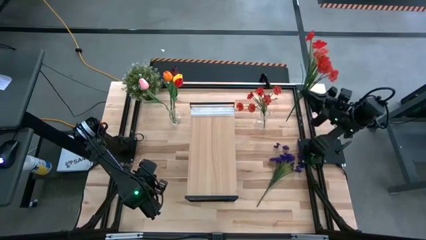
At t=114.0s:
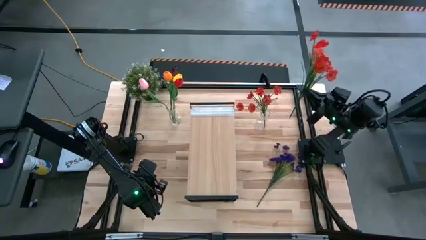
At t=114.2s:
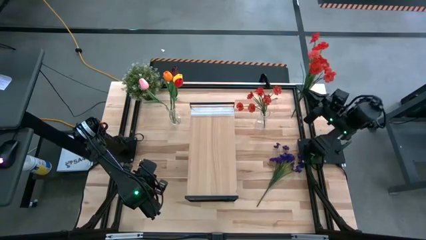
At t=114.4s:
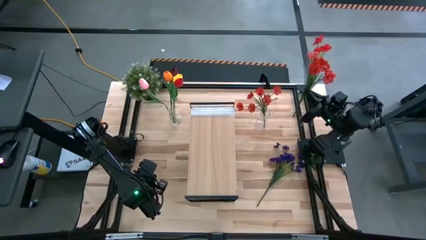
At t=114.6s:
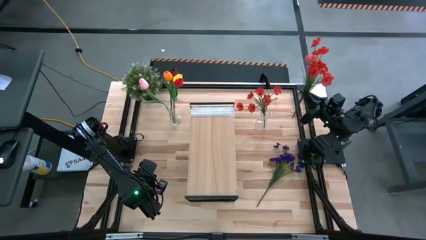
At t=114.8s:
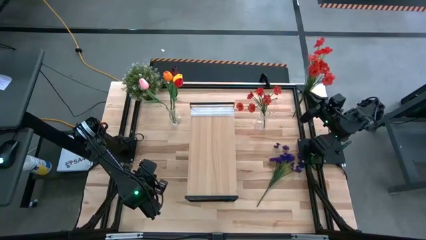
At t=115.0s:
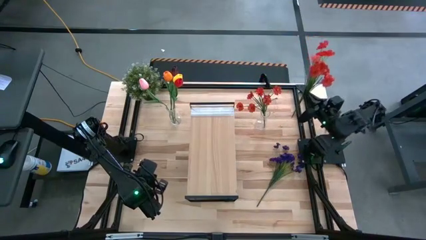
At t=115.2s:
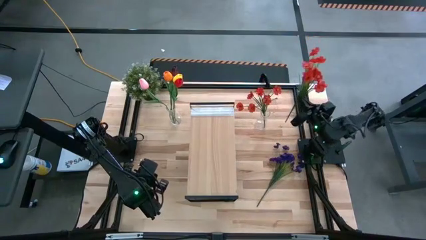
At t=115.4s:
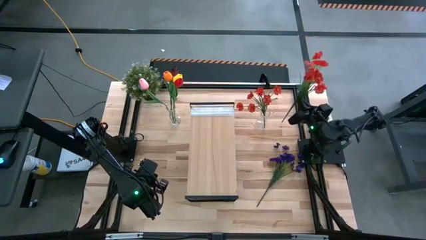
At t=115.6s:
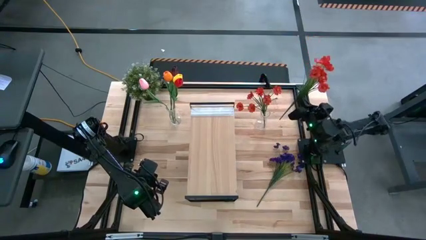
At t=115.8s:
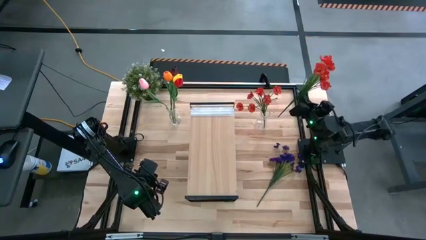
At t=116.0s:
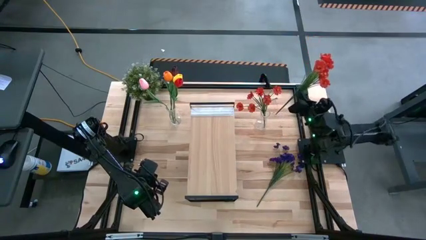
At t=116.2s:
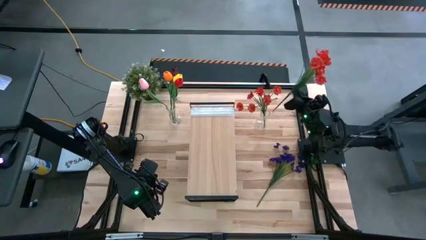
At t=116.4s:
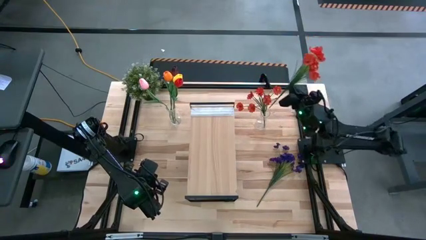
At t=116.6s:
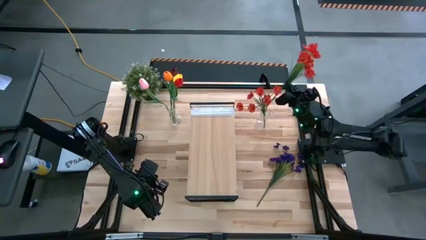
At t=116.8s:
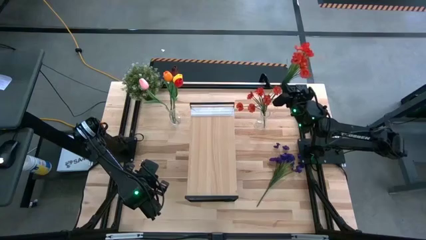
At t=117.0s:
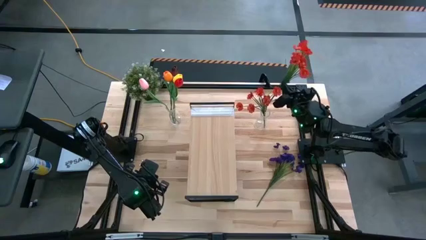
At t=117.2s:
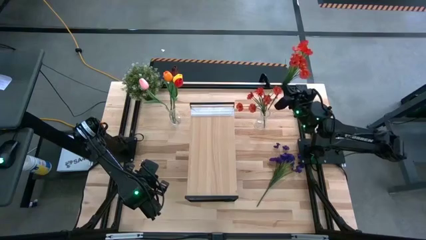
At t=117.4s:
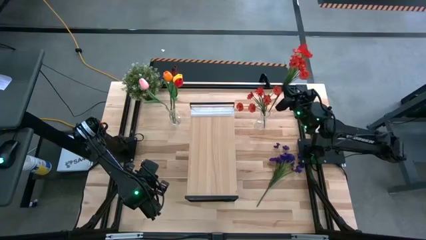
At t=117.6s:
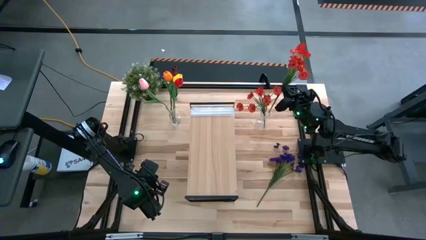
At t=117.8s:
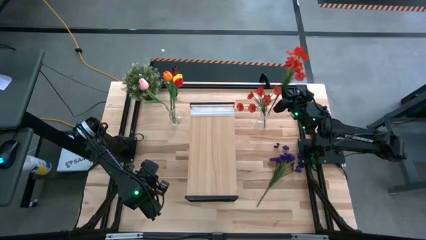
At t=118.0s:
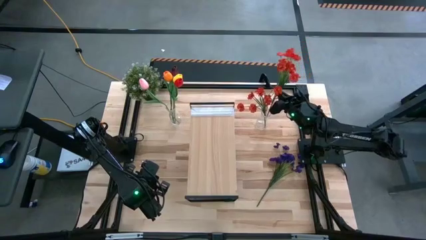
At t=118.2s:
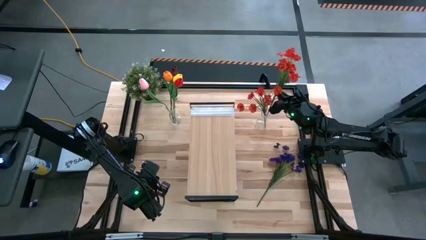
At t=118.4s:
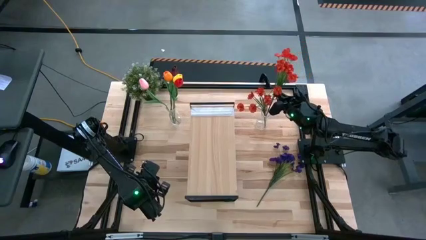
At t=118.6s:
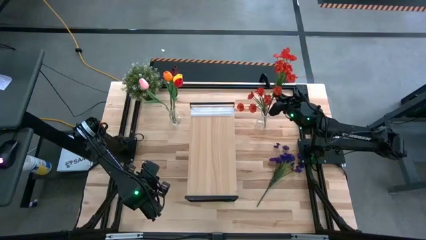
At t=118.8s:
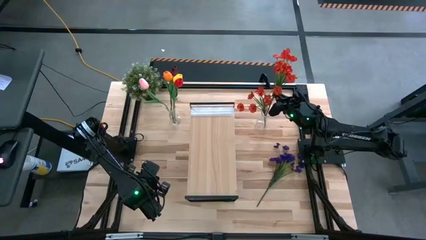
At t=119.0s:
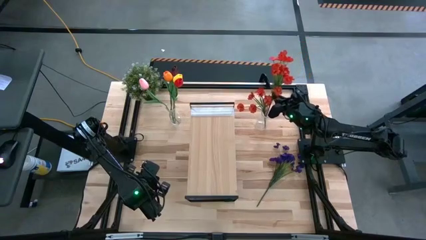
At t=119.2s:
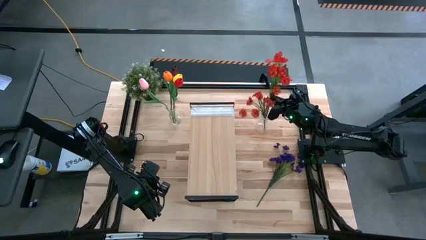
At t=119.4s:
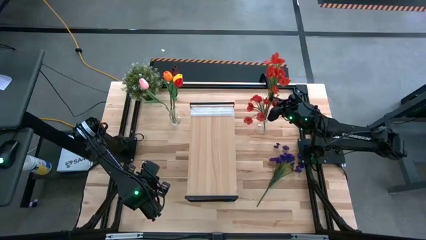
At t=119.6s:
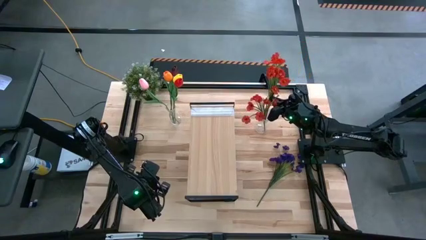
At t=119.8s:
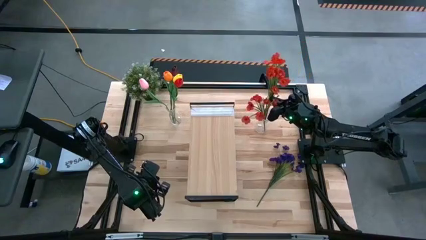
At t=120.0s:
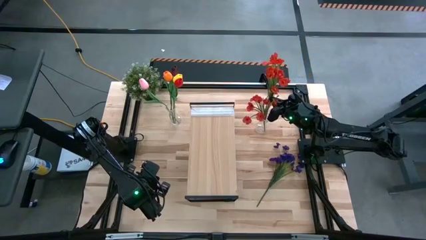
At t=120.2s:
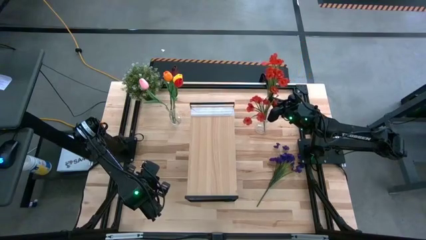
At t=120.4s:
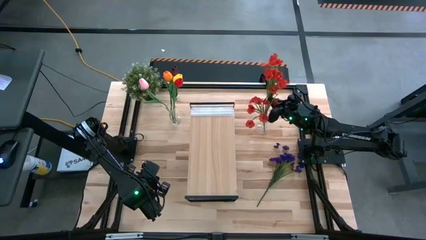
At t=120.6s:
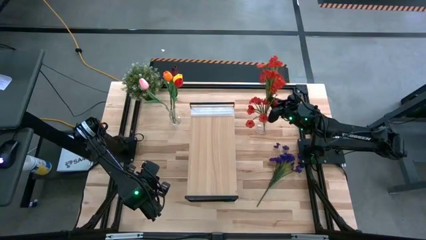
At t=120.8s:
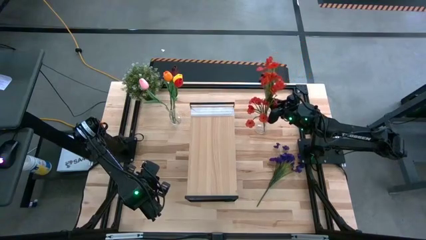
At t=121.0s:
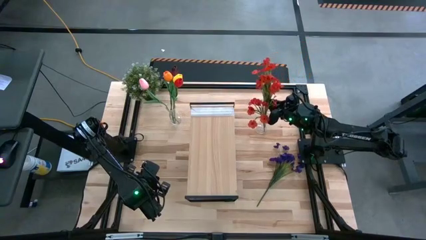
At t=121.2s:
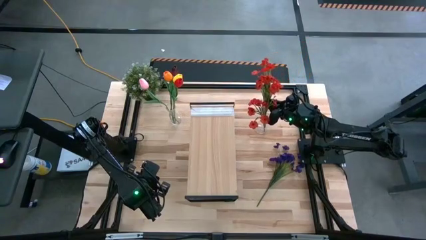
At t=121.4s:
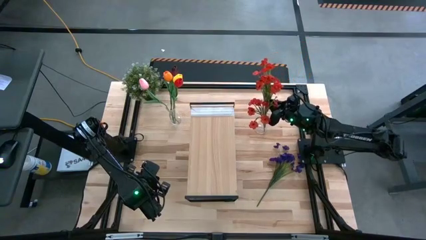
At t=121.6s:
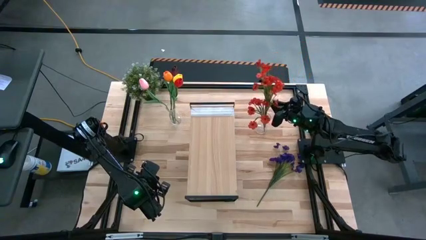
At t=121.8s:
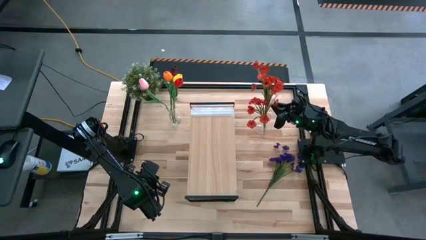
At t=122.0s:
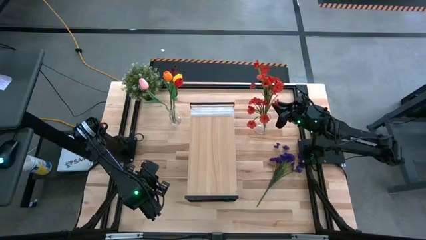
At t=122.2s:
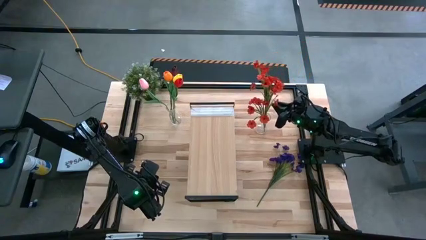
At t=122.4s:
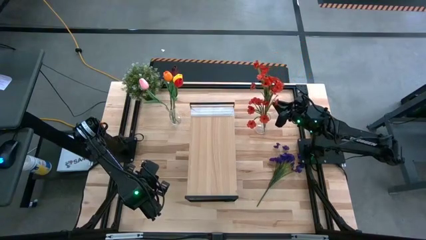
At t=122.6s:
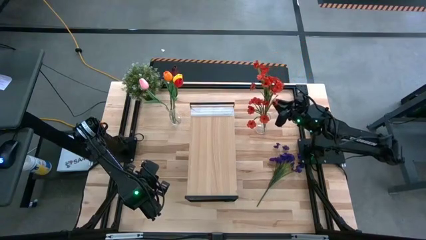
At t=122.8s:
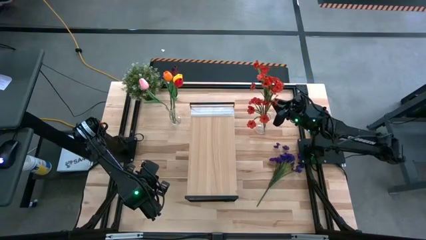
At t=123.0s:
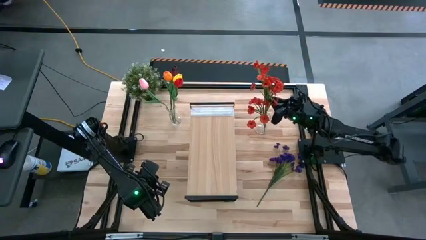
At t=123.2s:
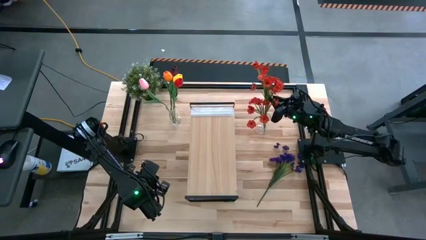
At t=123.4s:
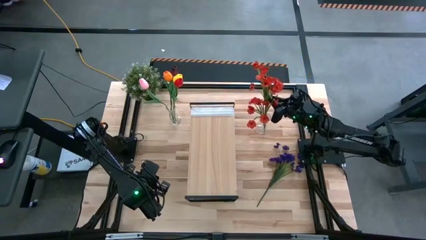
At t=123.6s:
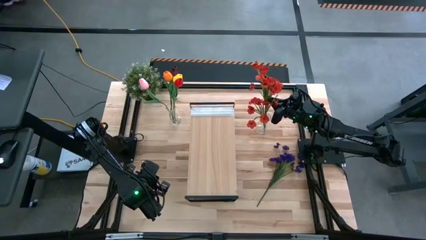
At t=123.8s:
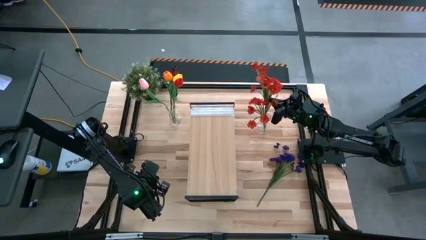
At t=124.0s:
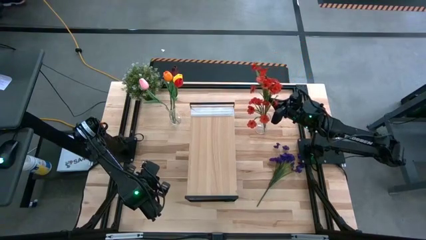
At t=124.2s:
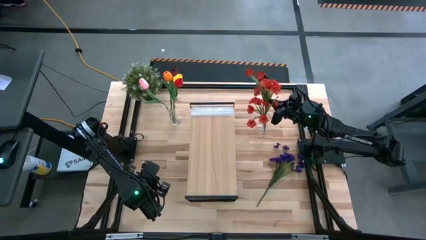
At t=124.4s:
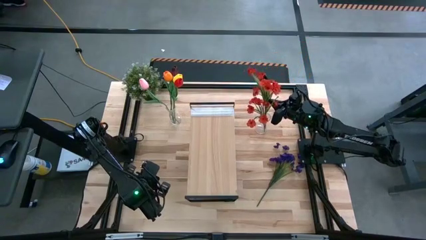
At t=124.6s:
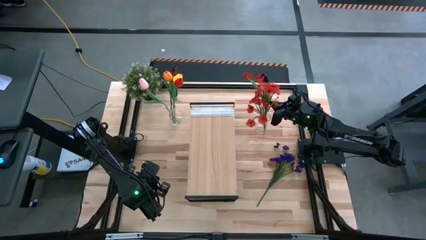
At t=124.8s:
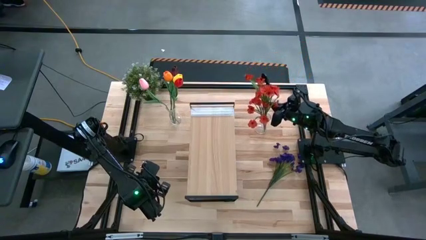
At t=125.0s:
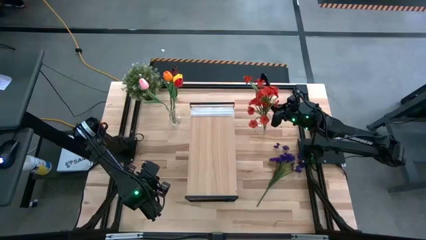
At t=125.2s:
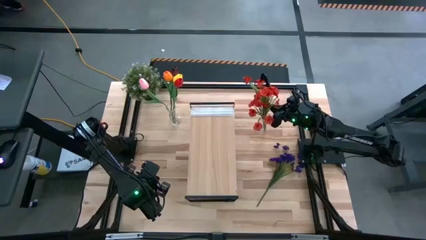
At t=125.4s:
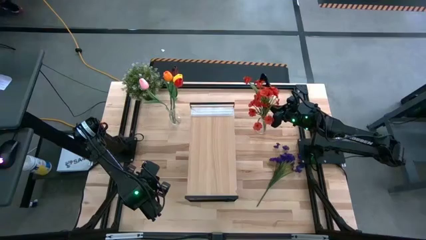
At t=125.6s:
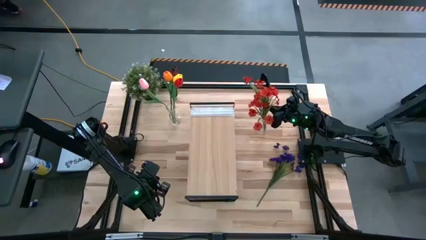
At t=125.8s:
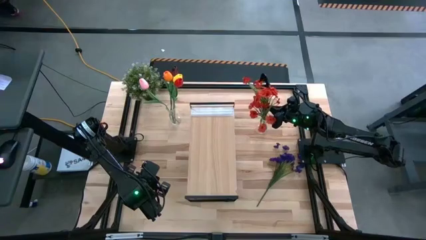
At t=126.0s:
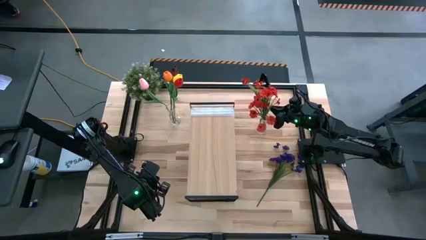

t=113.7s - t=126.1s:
Task: Pick and place flowers into a vace then onto a shelf
Put the orange flowers into the right transparent vase

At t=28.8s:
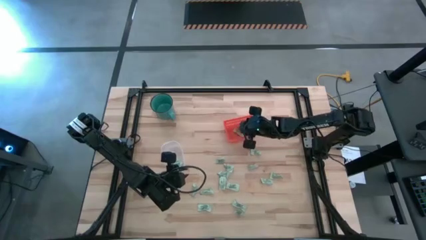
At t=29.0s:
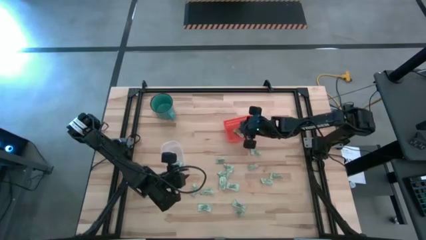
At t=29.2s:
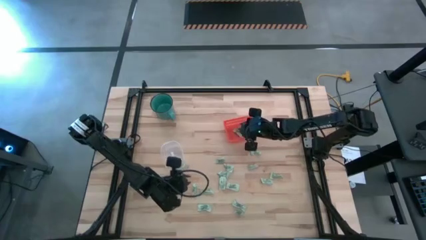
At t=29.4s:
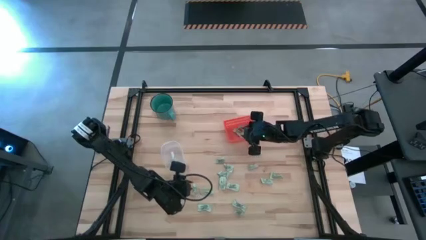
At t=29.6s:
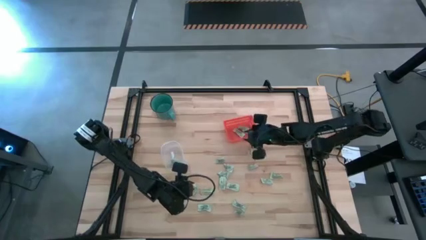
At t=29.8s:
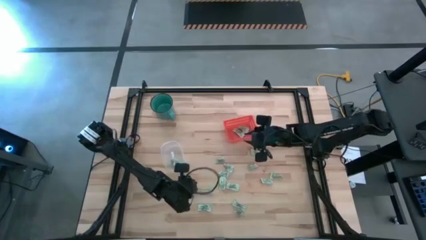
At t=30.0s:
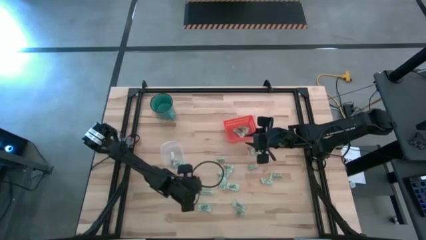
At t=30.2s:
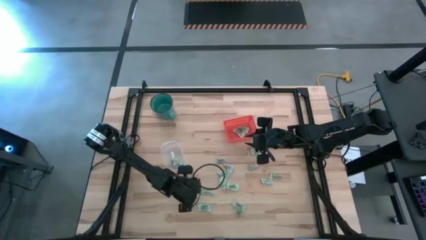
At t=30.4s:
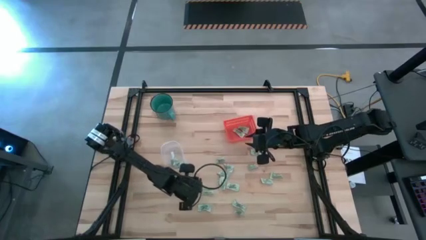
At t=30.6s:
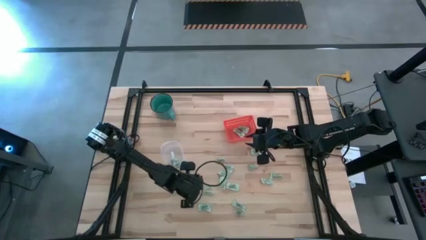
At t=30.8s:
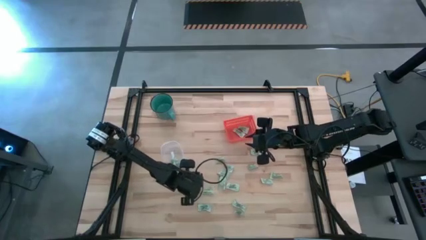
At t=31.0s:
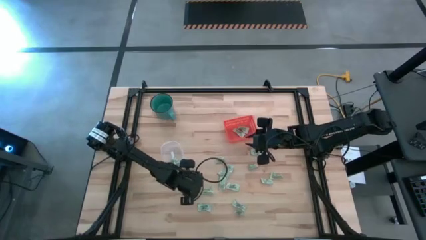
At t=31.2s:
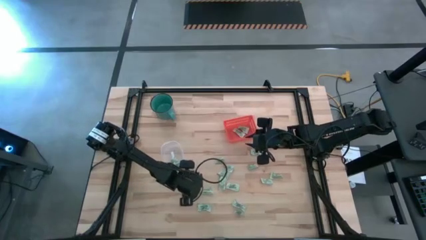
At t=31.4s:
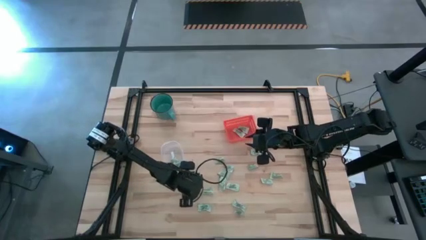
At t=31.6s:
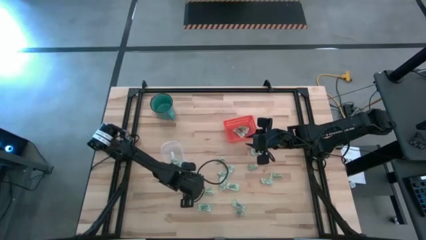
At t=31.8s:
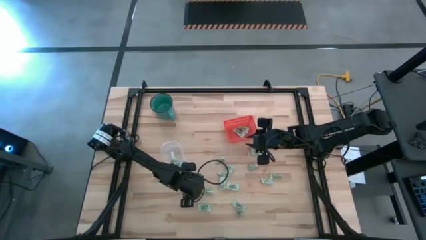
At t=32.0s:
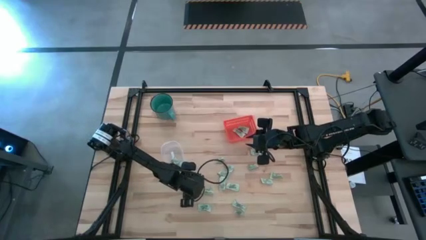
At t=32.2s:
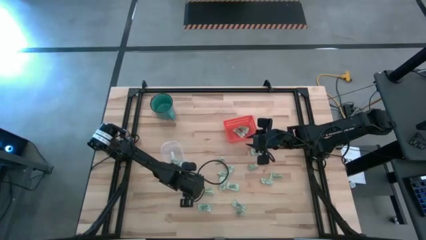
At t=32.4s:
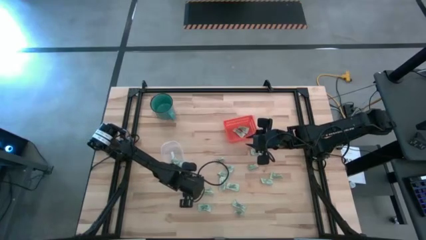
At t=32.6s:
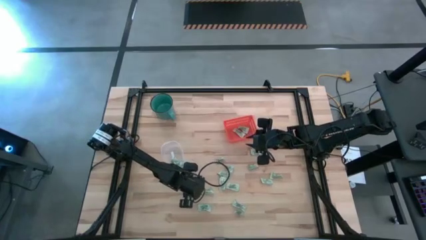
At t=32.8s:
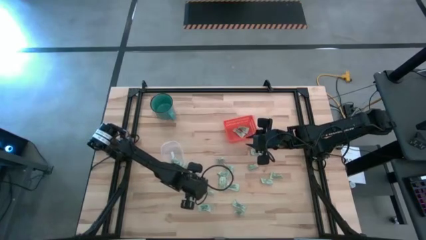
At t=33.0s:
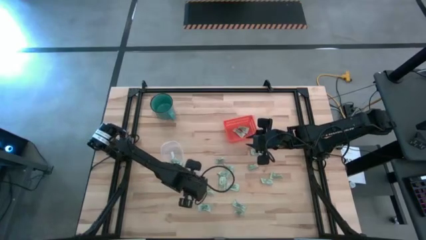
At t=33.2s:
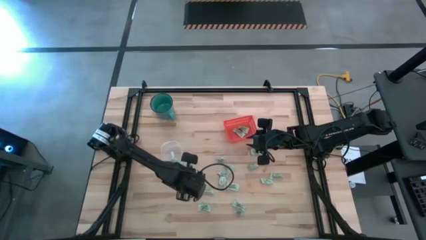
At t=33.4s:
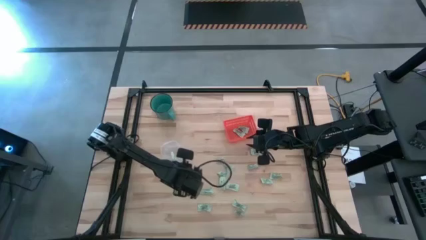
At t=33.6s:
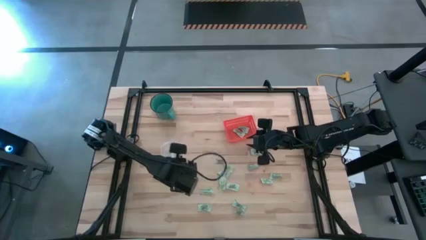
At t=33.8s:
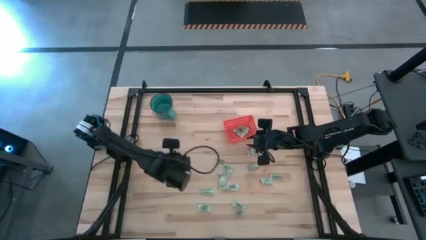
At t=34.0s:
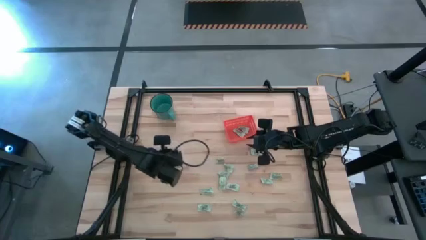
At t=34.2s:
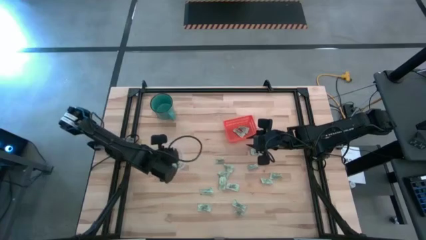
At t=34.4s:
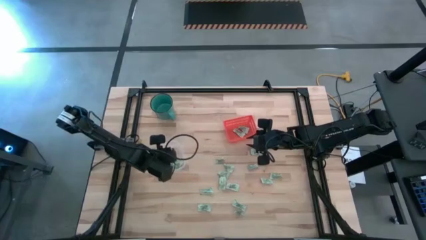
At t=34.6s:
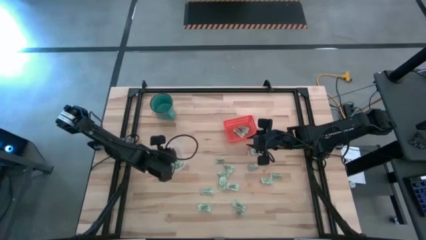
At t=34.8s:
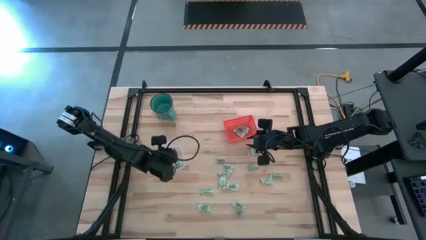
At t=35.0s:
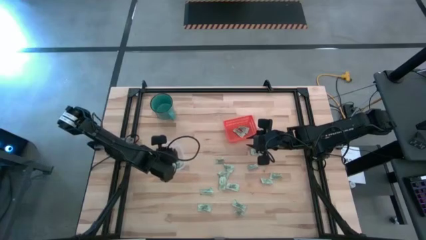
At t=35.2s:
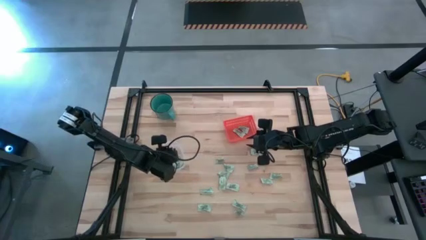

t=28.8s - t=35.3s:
Task: Pick and place items into bin
Put the light green stevia packet into the transparent container
